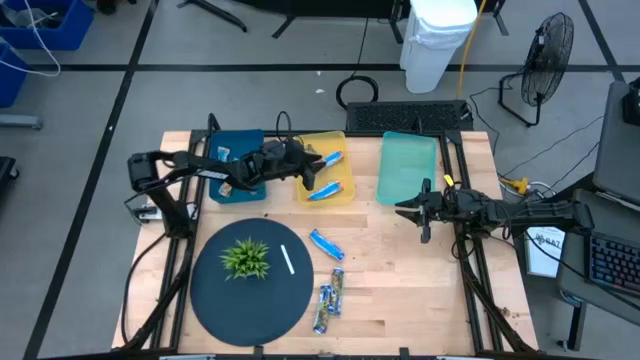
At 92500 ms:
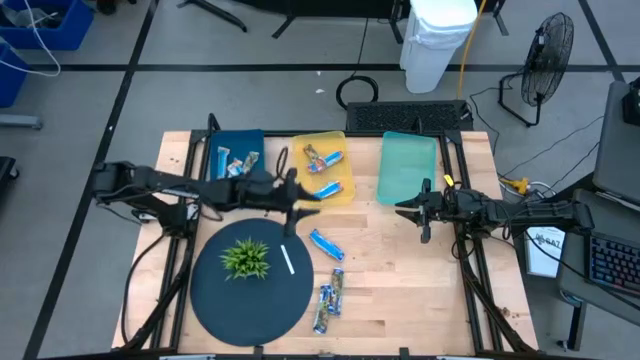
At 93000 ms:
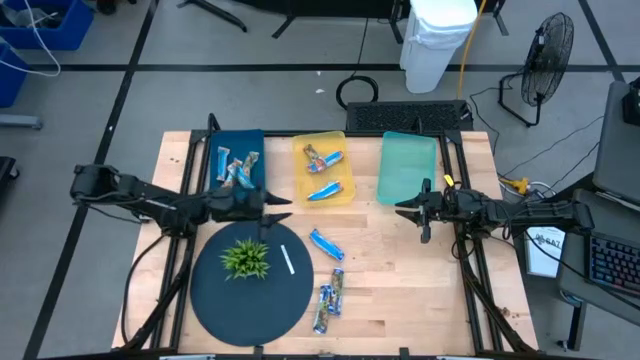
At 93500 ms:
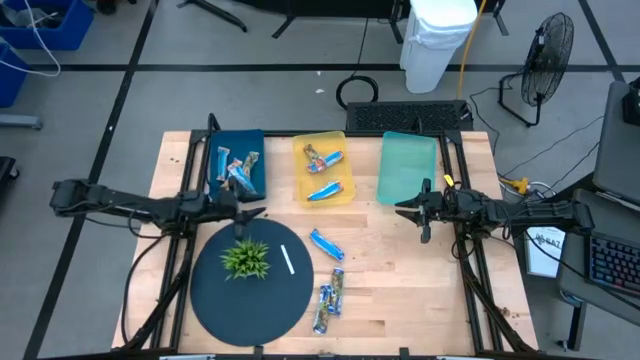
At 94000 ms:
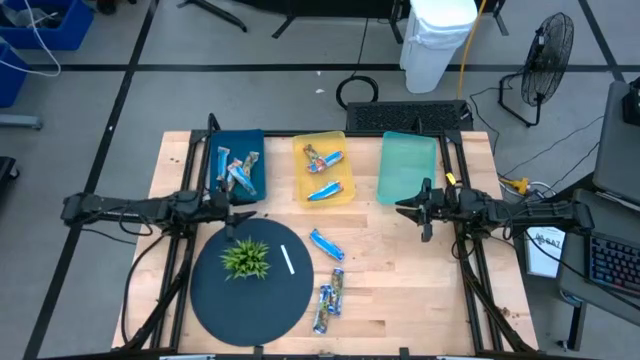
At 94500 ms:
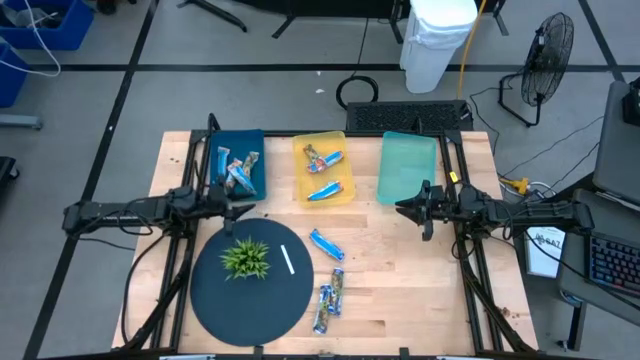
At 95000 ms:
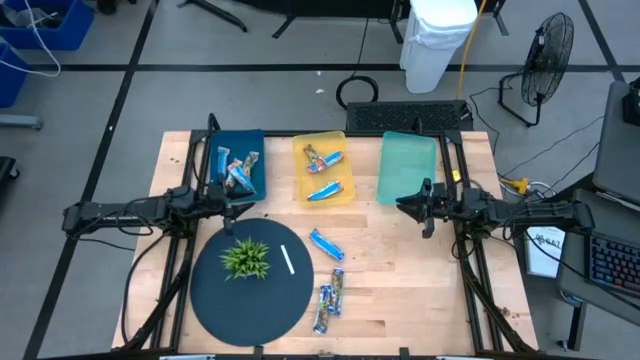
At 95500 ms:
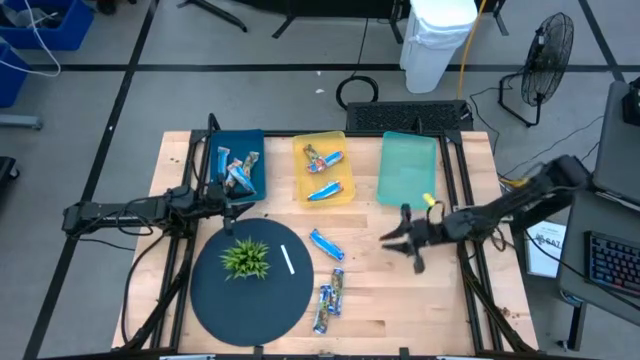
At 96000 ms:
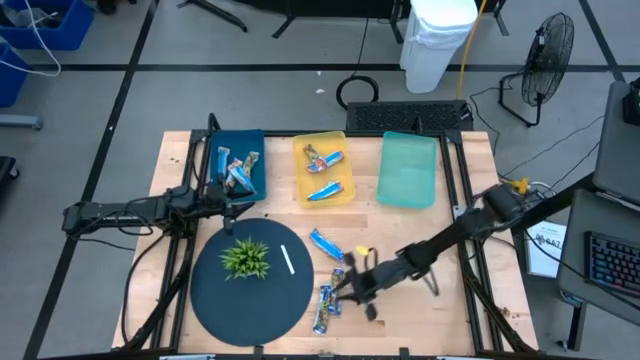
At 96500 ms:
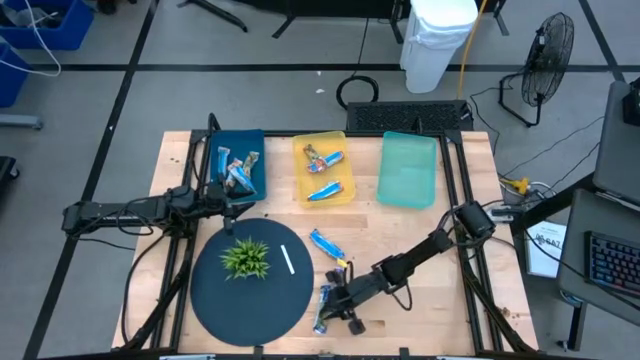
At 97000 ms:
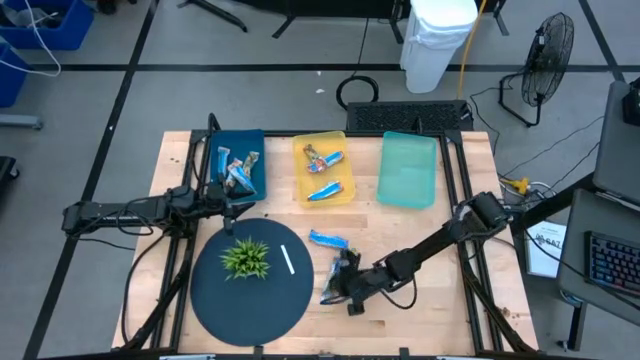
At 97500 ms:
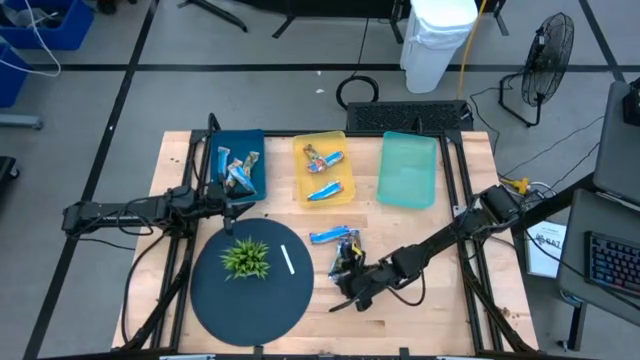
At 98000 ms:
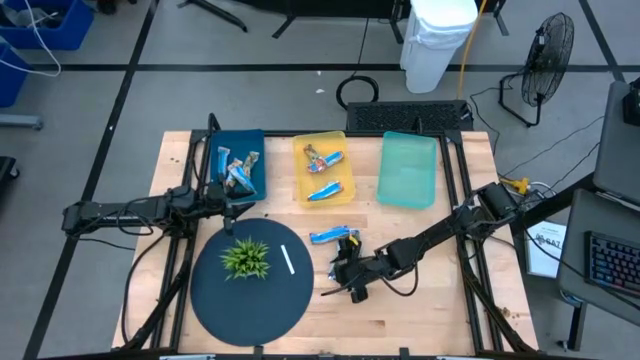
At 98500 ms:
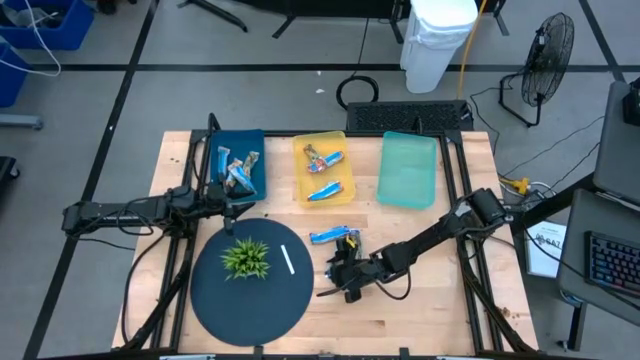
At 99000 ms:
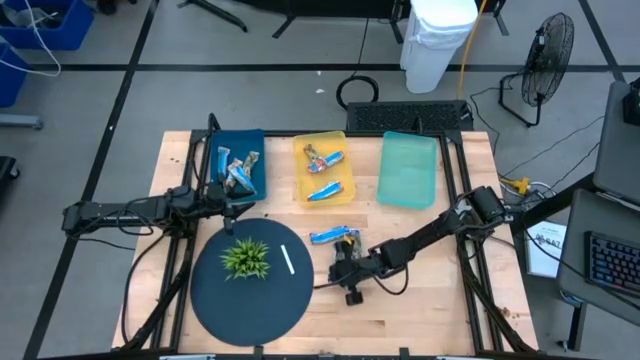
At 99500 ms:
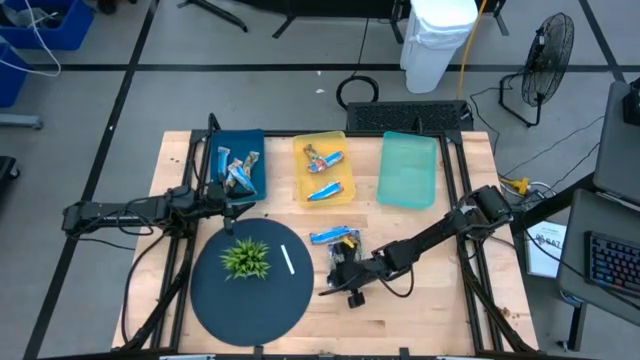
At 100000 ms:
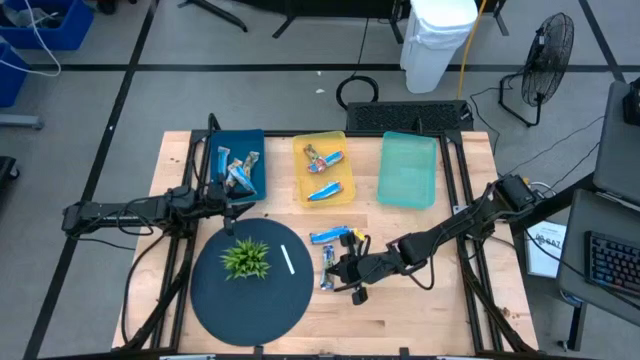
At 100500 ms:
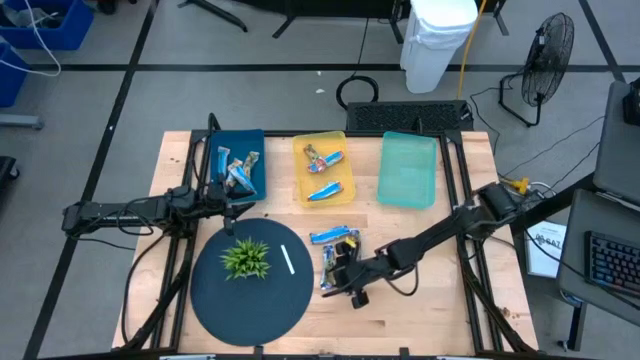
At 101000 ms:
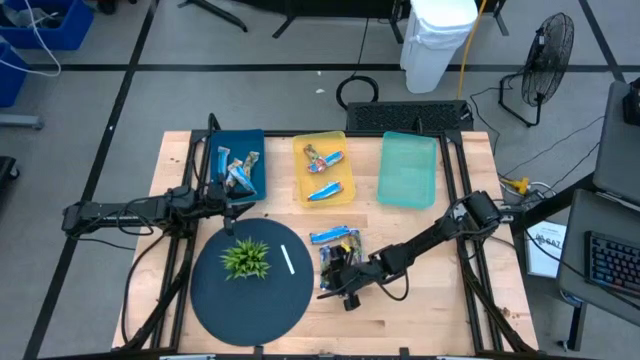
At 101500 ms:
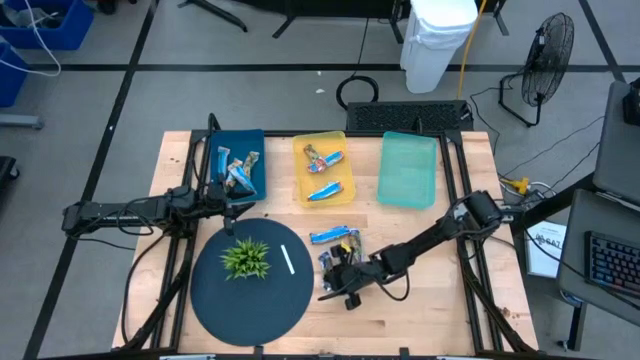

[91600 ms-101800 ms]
Task: Pick and place Granola Bars by type
Put the blue granola bar into the green bin

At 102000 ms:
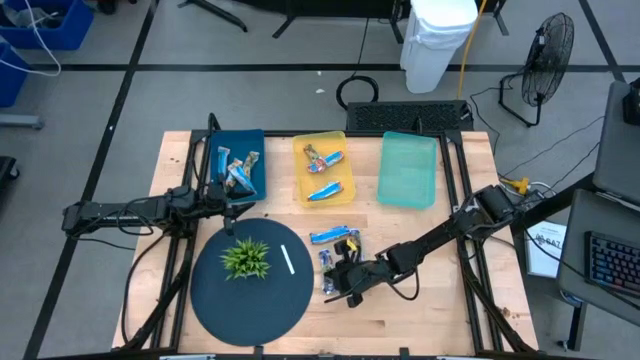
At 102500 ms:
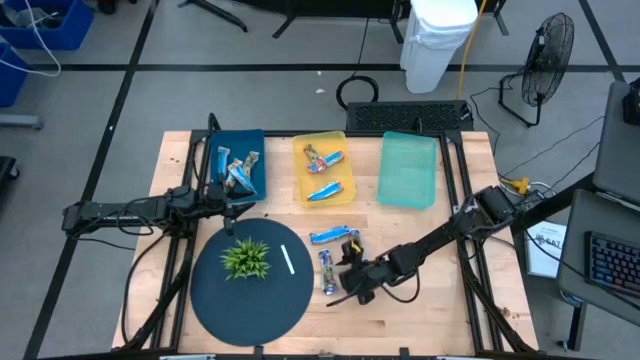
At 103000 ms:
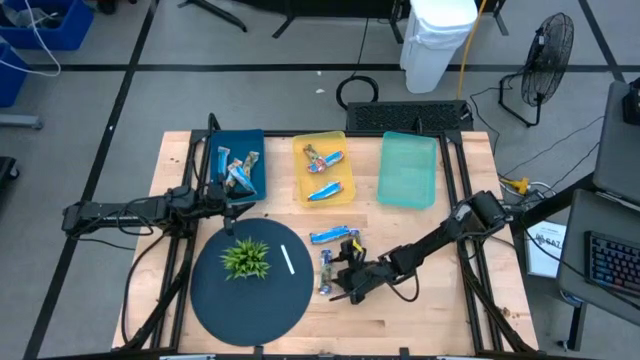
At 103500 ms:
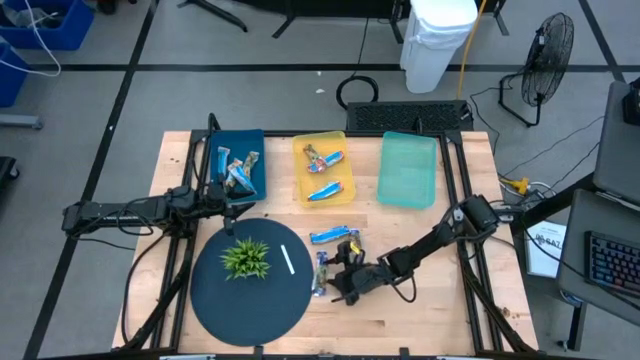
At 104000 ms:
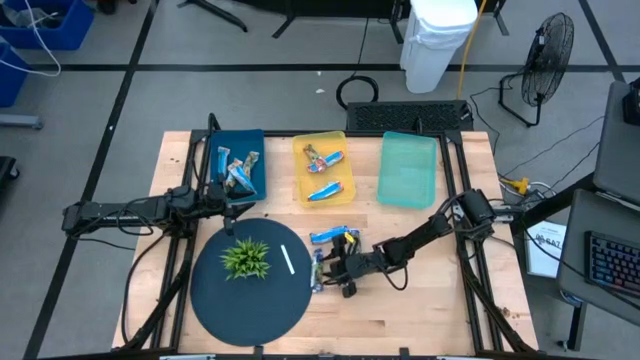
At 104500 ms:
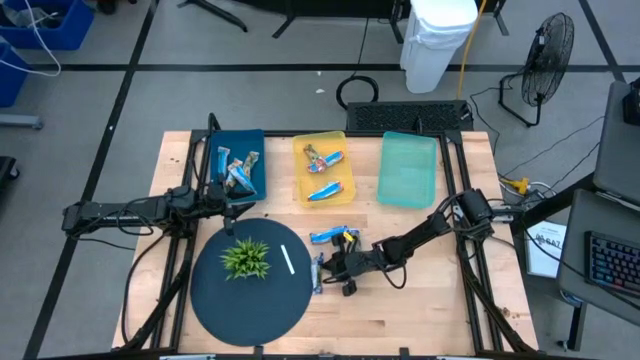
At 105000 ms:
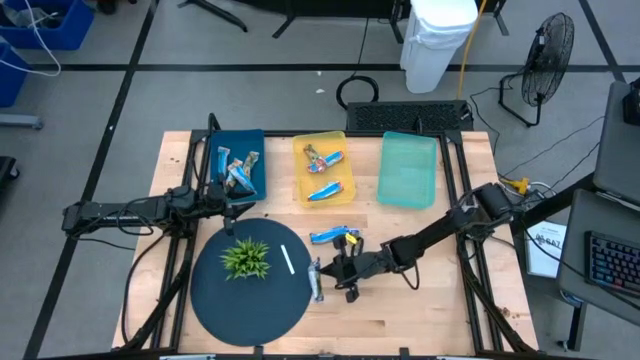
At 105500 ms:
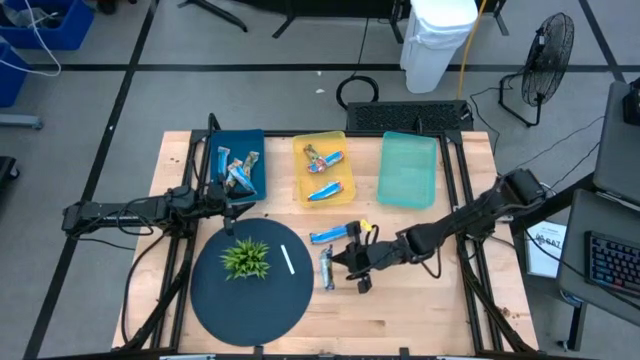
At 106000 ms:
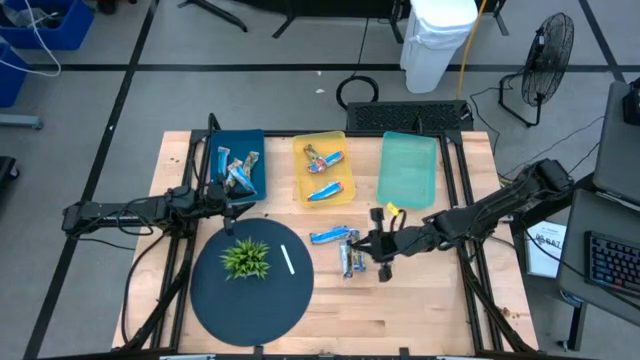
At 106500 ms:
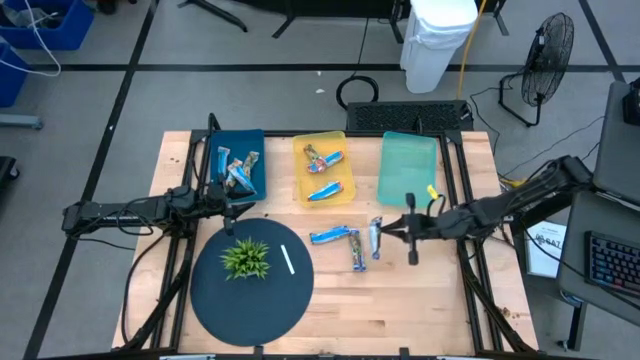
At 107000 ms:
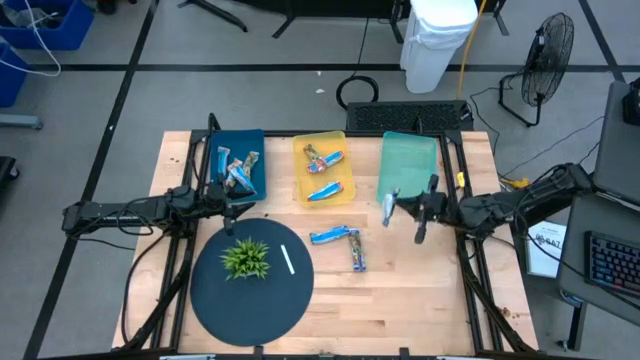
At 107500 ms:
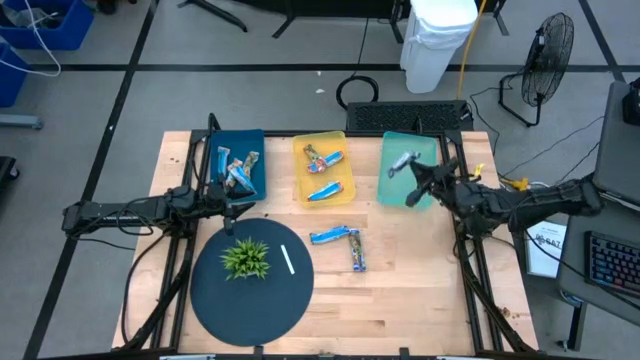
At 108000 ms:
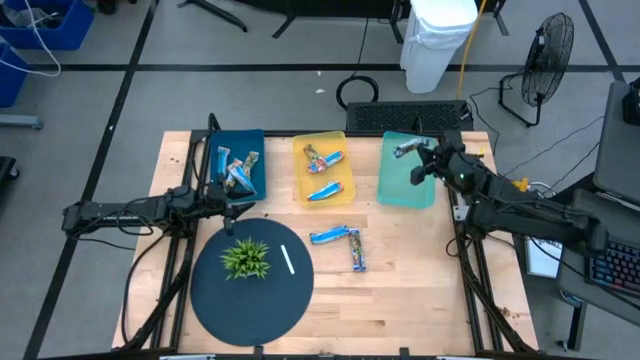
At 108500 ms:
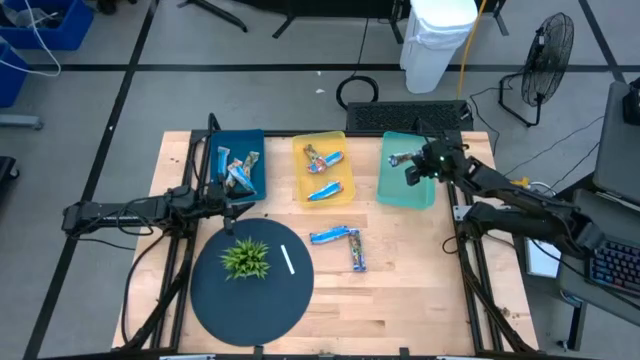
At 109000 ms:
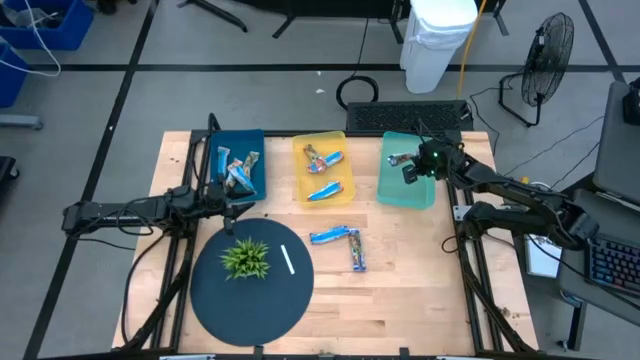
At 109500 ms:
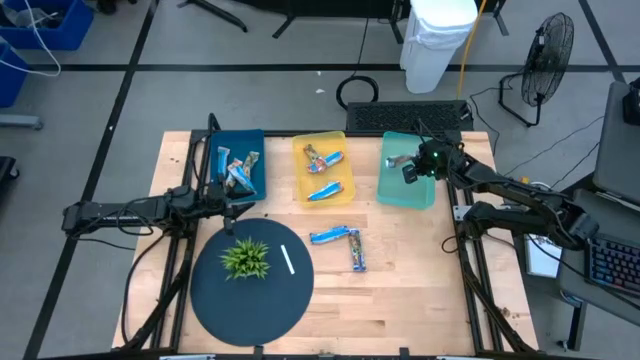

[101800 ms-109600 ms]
Put the blue granola bar into the green bin

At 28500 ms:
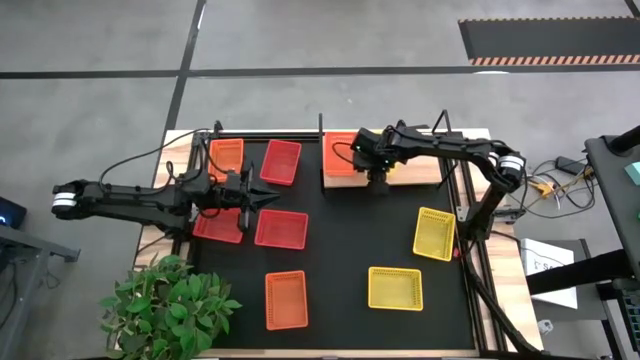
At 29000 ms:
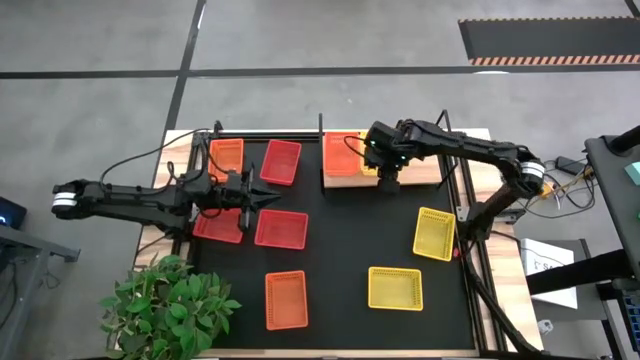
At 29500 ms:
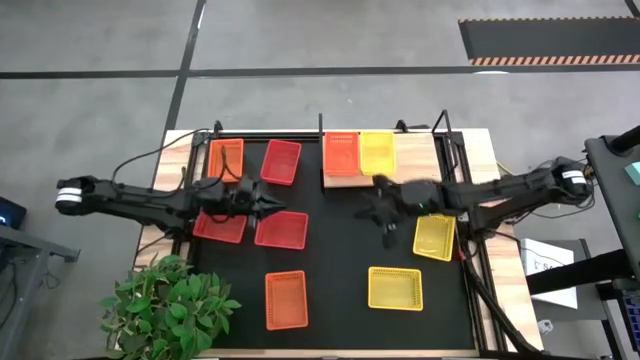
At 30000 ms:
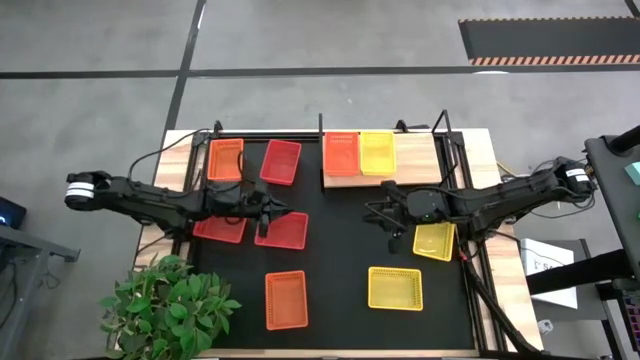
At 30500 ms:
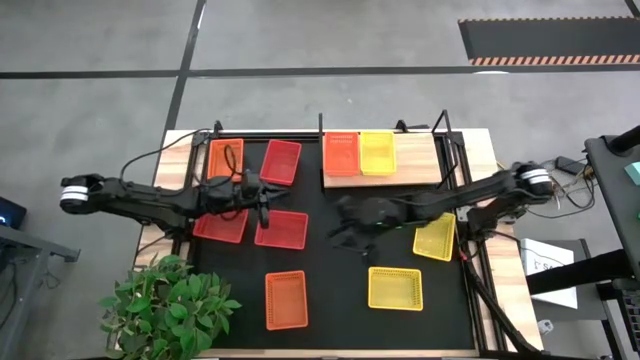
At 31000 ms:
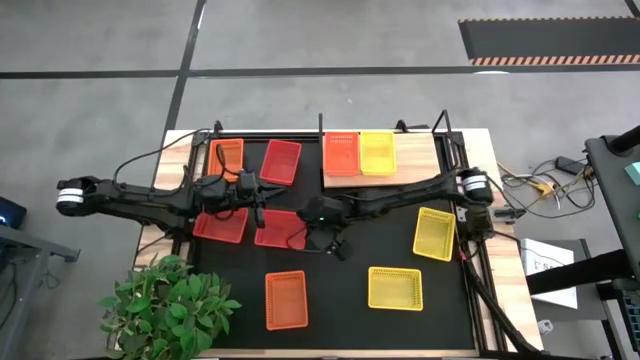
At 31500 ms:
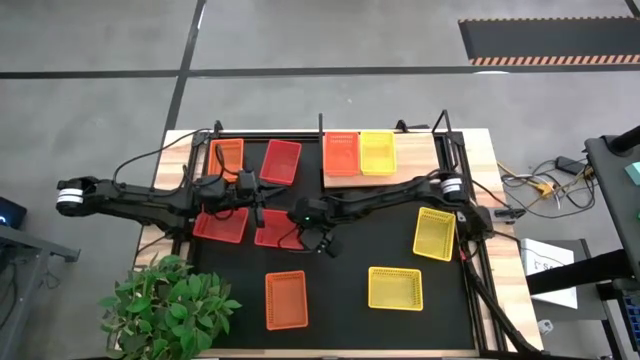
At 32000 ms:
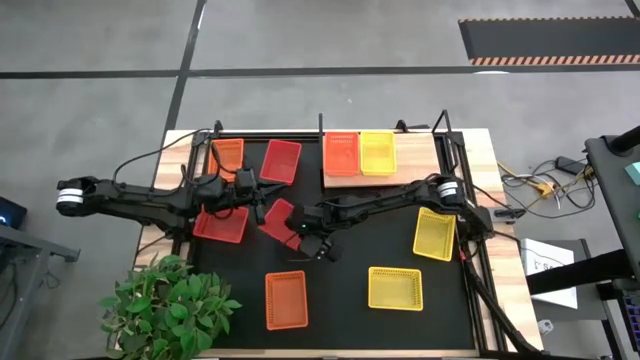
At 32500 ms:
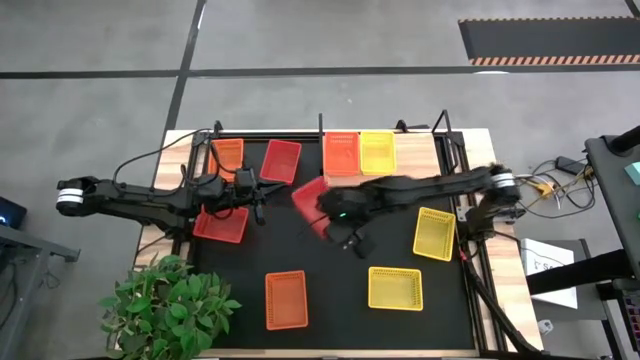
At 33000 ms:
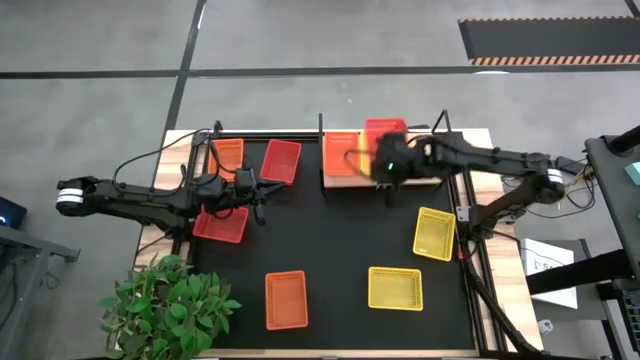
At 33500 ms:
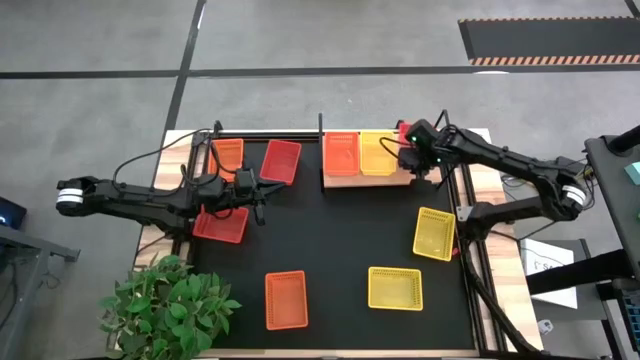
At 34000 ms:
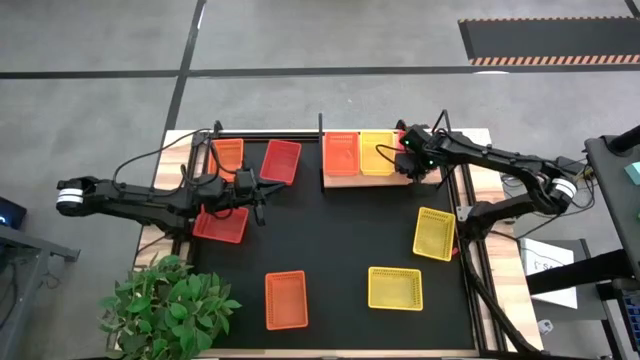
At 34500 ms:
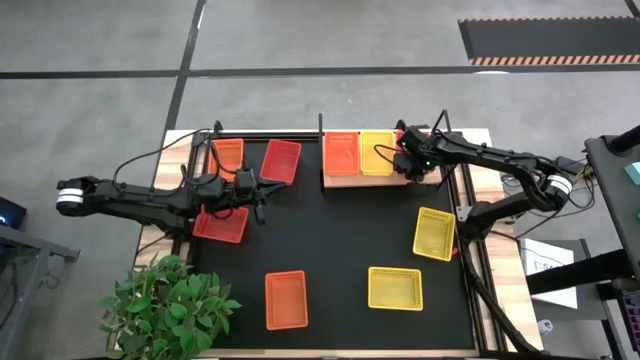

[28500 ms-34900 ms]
Task: Stack baskets on shelf by color
Put the bottom right red bin on the shelf
